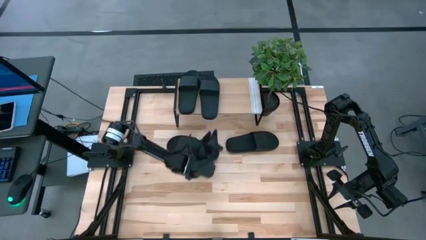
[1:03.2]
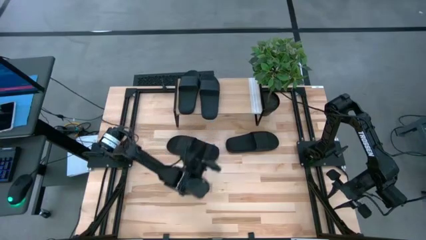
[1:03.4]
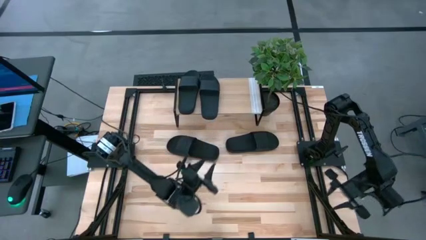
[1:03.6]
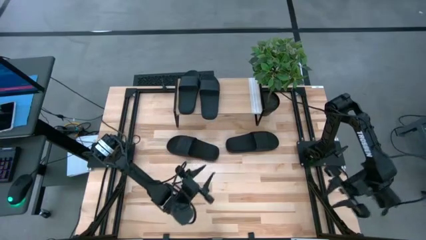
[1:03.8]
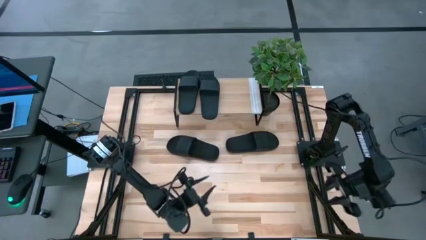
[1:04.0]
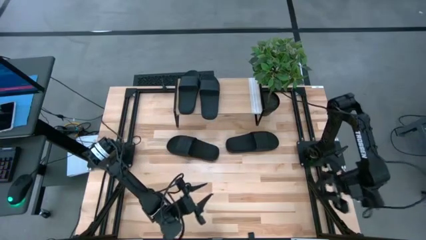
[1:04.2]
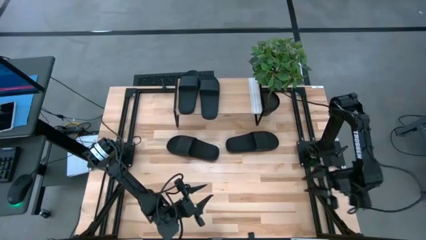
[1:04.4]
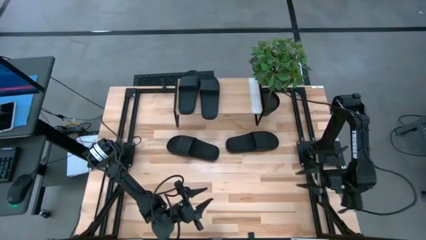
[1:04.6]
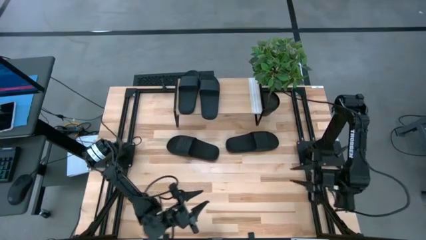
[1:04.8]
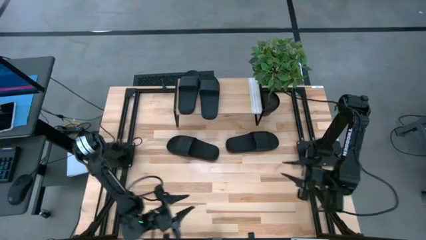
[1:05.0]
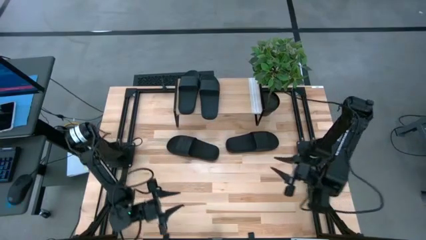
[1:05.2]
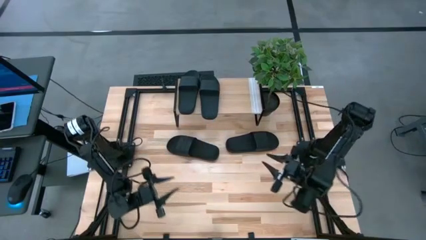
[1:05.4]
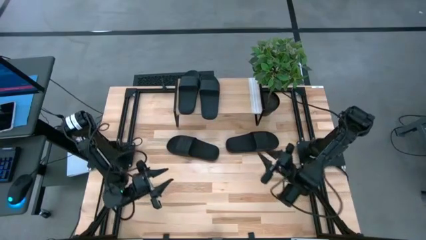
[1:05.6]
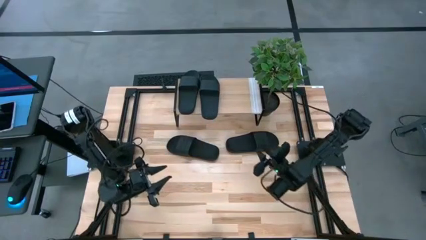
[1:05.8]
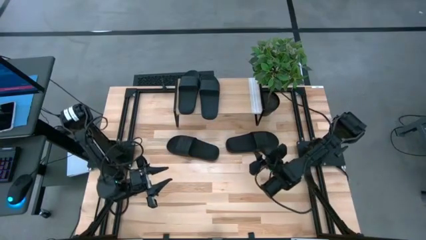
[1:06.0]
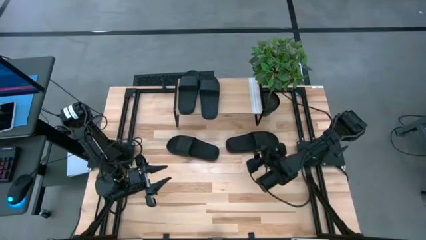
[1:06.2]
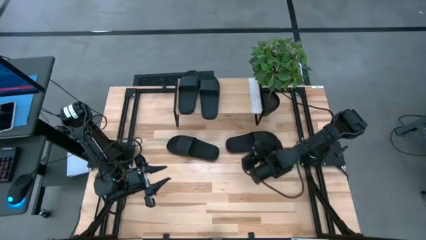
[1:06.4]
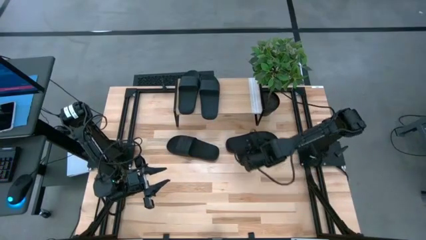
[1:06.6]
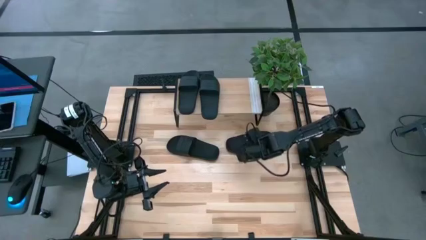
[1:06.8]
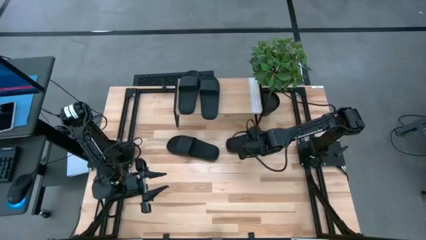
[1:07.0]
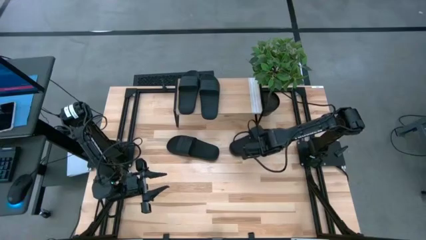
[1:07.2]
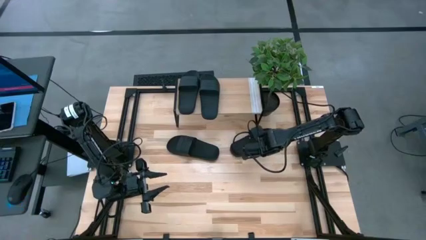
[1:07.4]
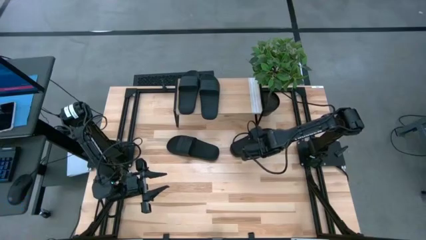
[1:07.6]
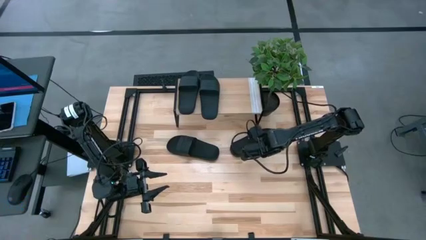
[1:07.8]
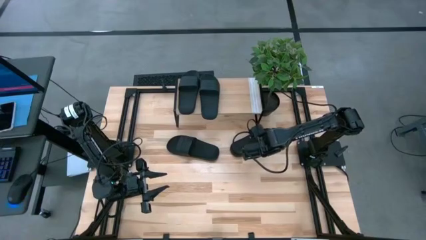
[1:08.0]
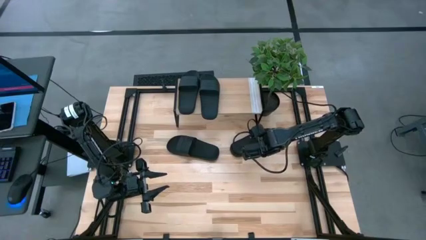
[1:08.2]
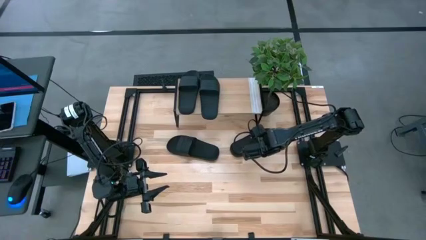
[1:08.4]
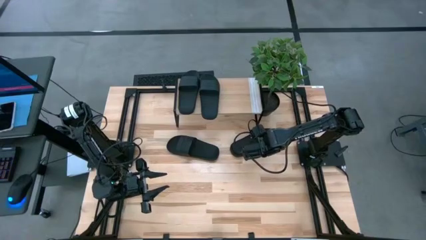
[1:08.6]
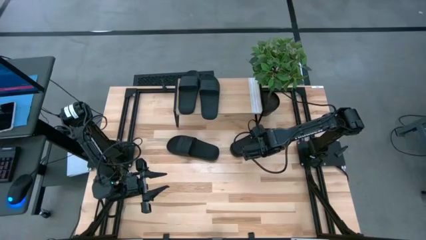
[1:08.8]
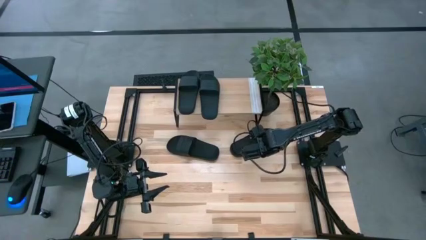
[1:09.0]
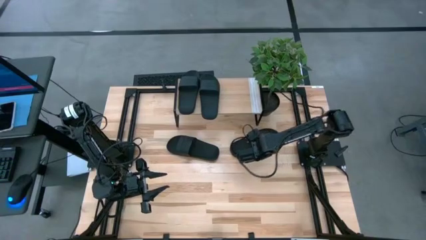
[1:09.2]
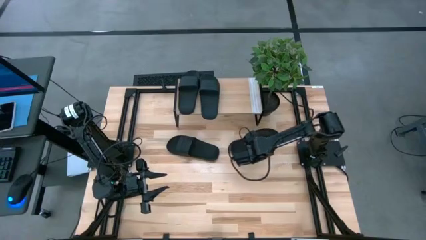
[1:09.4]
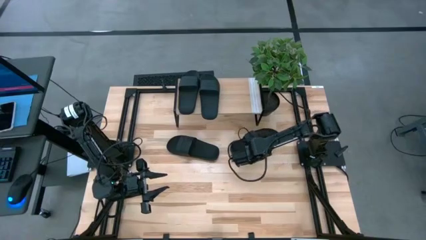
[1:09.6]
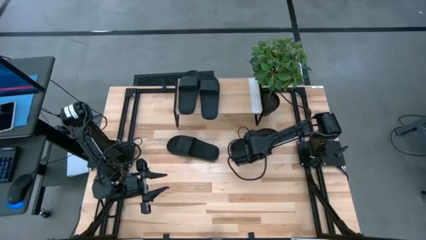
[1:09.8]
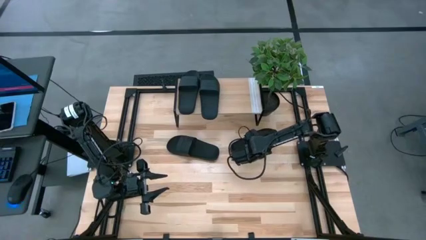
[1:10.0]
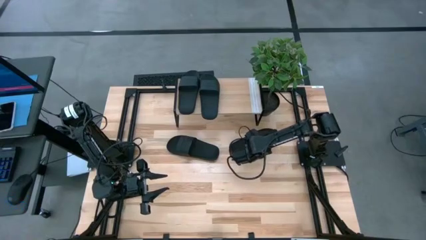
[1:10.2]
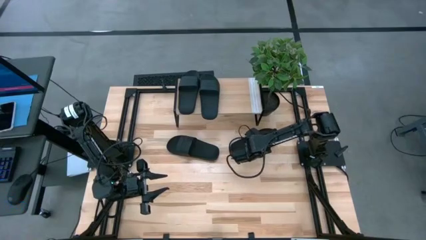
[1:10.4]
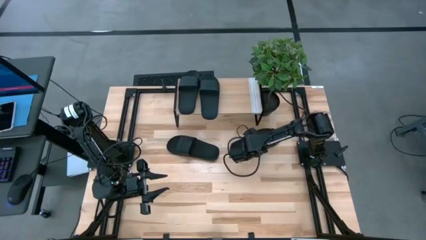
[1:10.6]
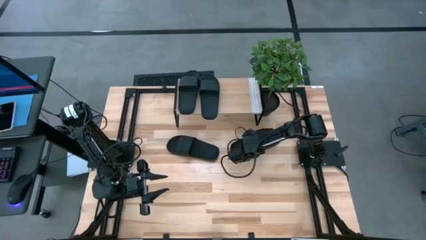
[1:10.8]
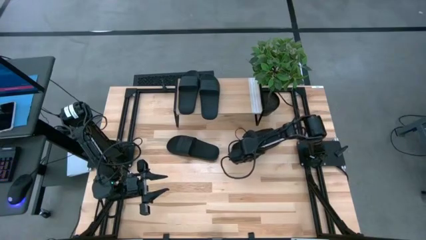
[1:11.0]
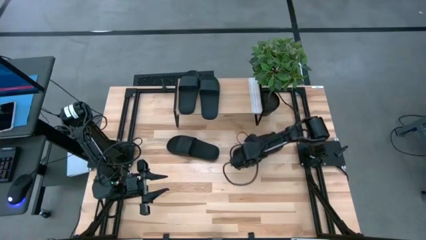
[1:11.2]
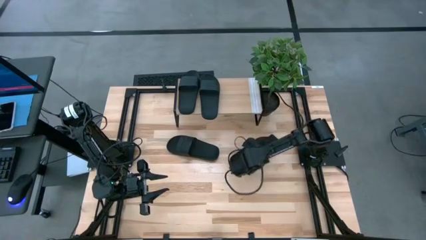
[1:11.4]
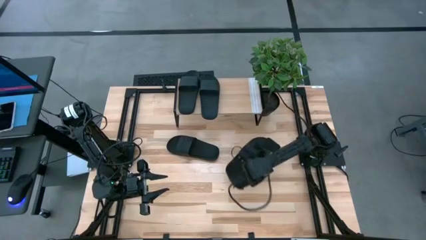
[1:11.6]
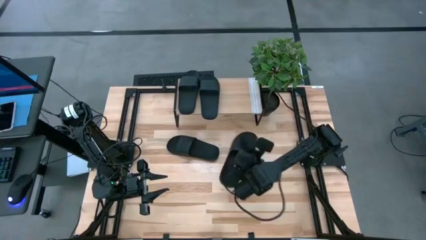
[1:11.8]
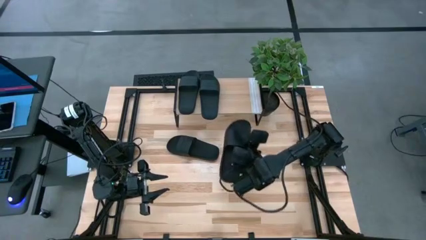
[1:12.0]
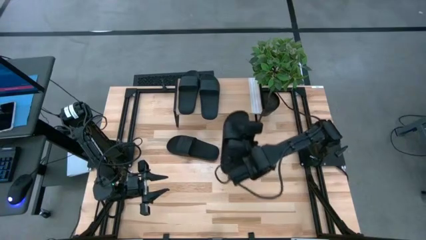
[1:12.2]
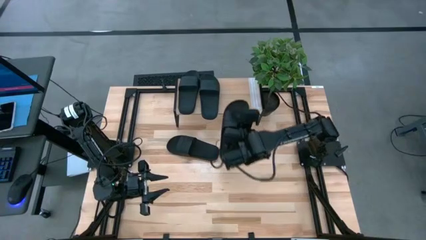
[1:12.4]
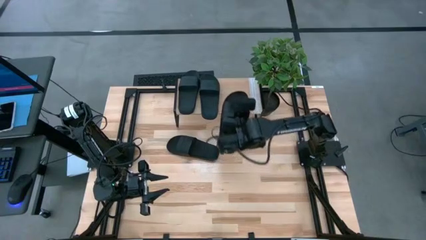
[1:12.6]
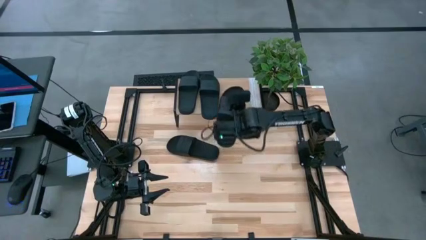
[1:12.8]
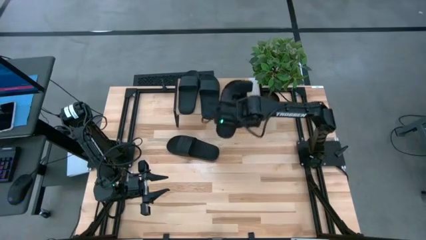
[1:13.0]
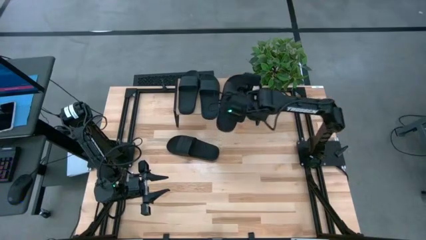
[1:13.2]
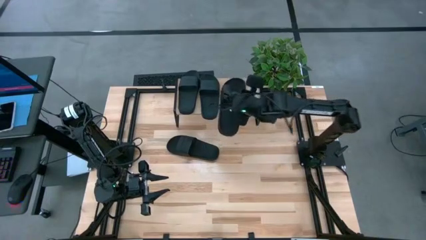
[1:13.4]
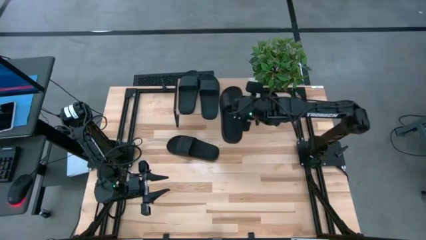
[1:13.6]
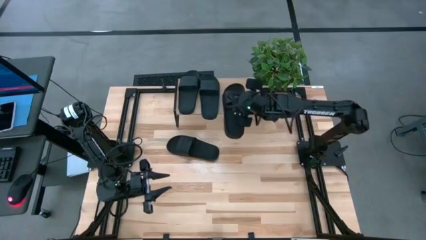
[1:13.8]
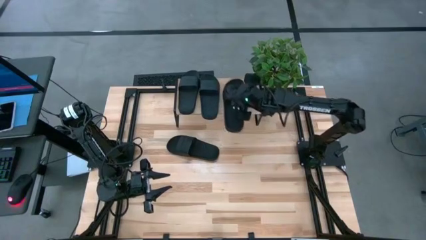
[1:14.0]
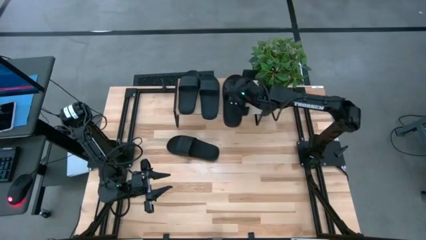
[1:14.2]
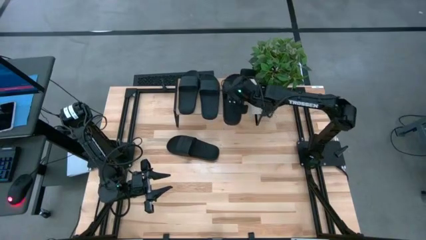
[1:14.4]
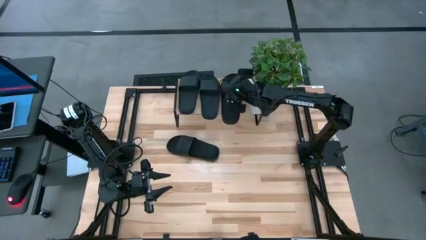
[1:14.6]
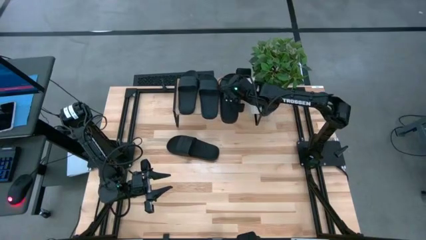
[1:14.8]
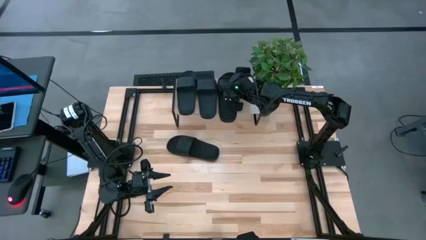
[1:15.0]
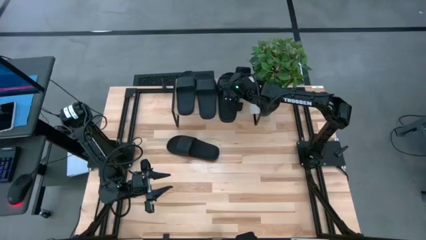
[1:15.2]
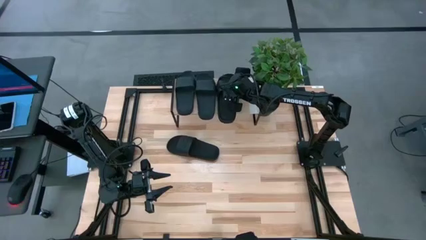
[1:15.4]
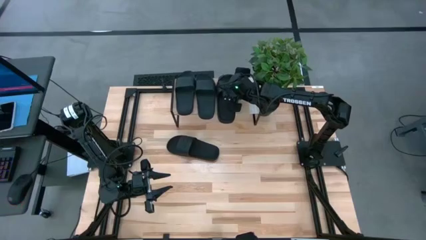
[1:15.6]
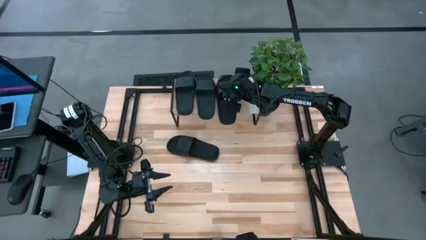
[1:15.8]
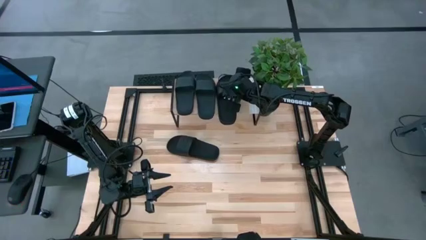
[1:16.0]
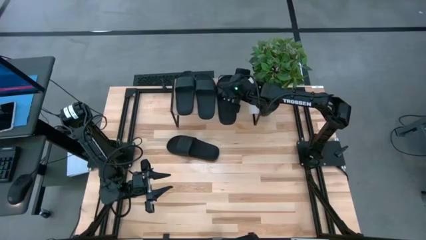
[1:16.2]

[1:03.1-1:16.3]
Task: Pick and place slides into the shelf
Put the right black slide on the shelf

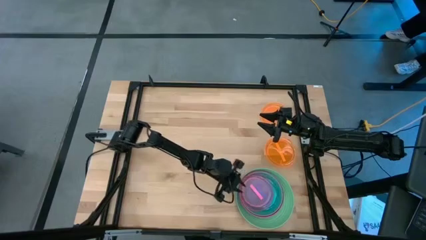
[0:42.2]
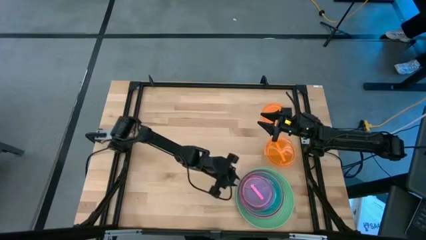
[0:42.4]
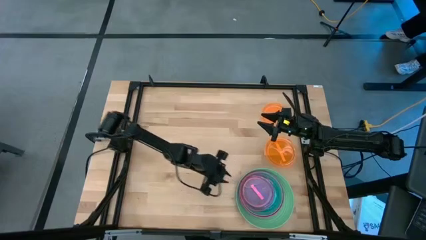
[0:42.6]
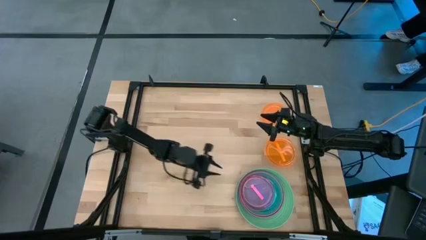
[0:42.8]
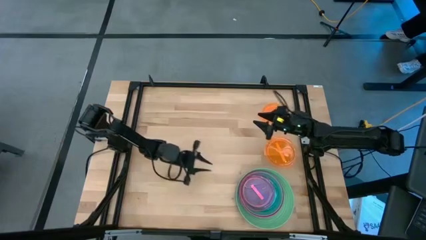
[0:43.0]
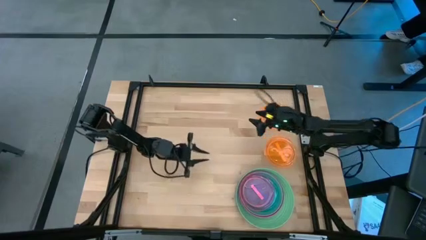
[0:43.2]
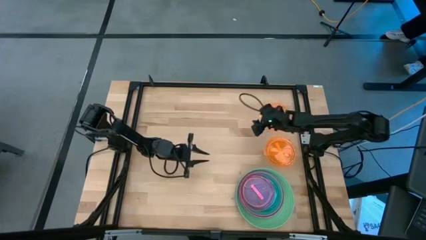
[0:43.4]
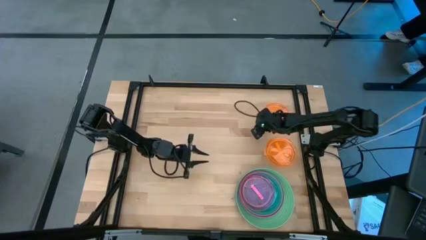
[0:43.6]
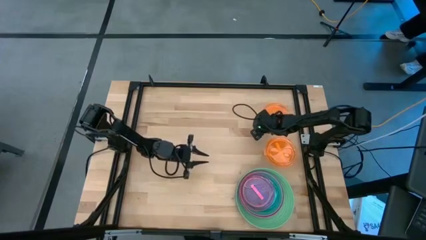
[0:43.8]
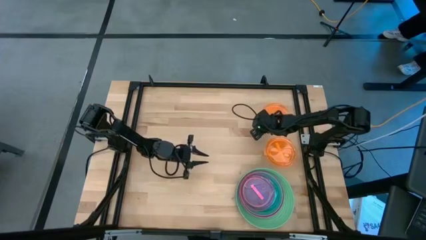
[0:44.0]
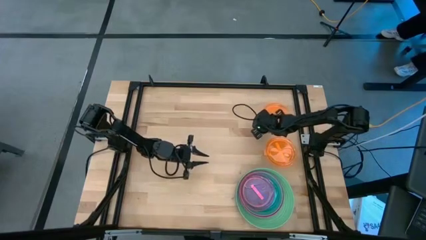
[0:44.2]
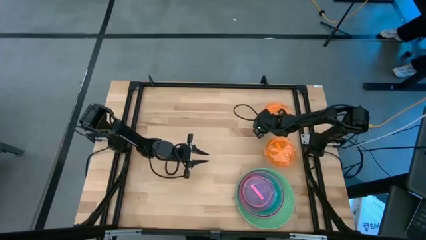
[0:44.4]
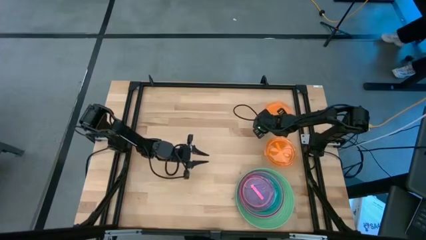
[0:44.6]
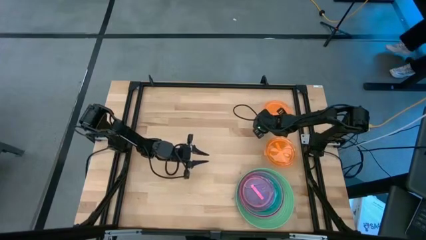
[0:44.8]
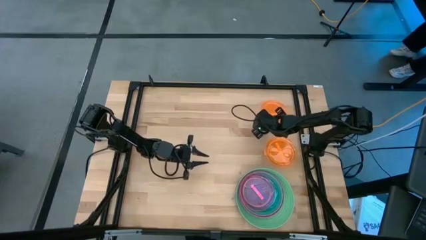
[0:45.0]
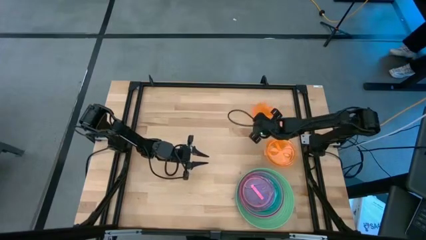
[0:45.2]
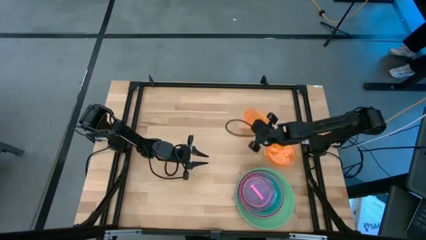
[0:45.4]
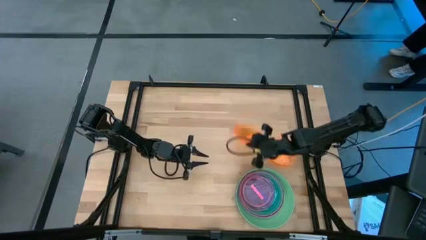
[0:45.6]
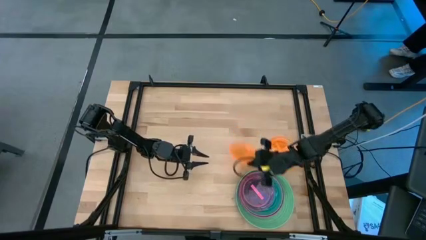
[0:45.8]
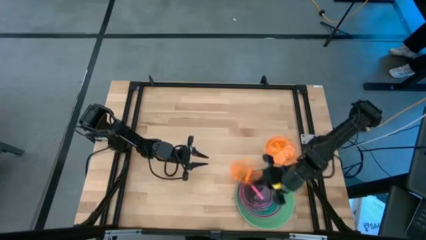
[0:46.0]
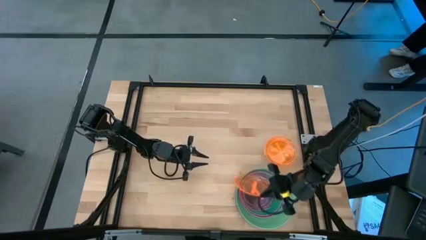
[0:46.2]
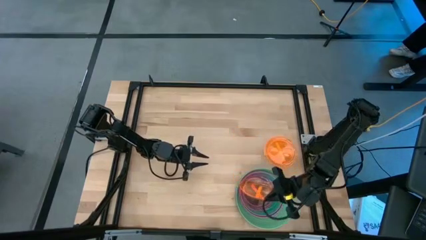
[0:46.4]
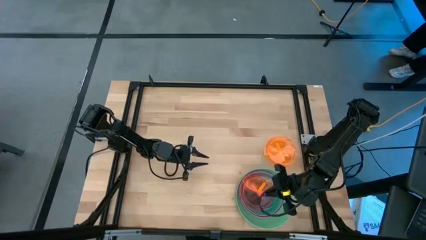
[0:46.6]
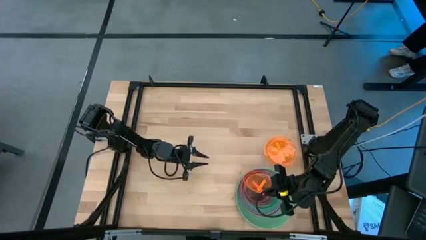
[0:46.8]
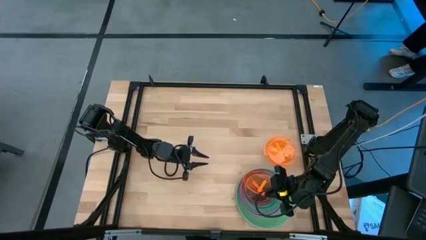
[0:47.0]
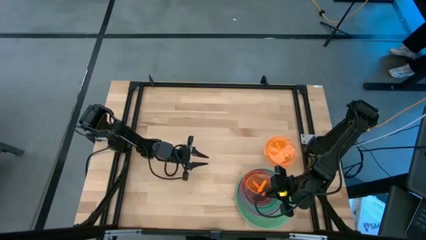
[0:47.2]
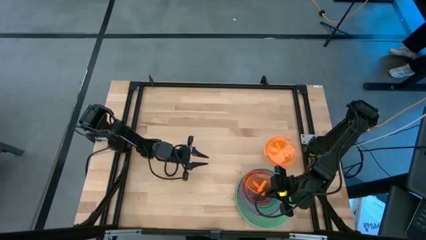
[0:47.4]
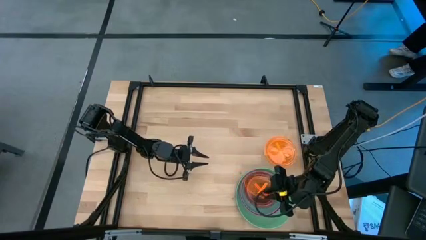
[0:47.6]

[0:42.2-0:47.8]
Task: Stack plastic plates
Stack the top orange plate on top of the red plate
